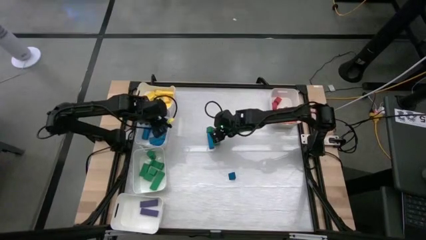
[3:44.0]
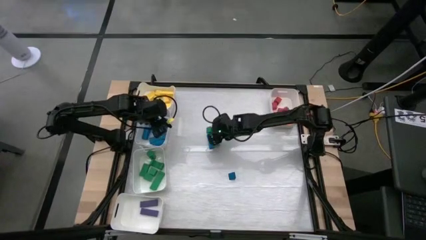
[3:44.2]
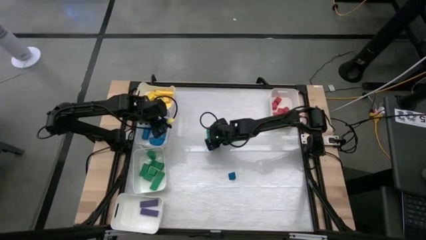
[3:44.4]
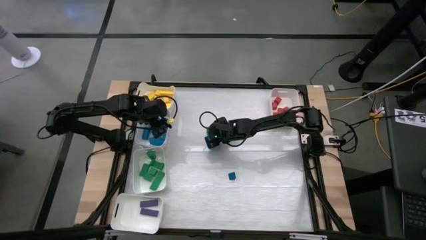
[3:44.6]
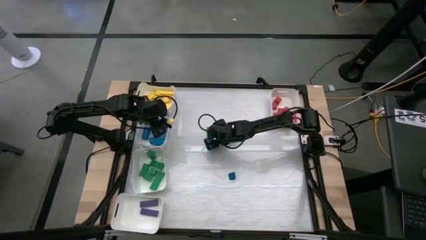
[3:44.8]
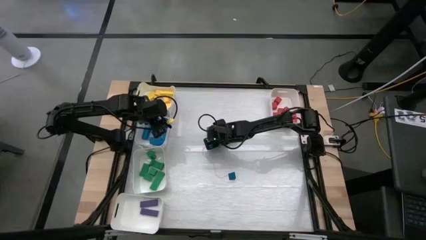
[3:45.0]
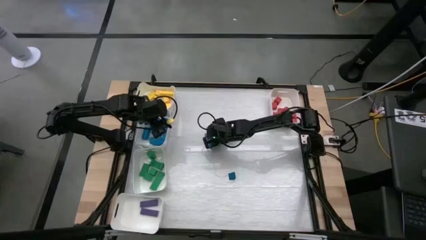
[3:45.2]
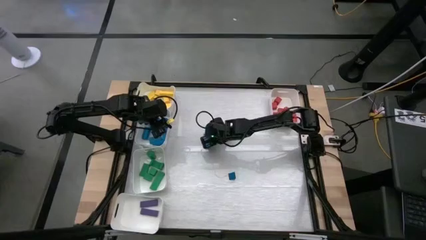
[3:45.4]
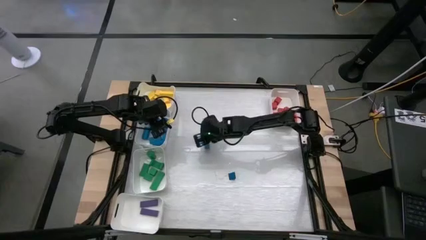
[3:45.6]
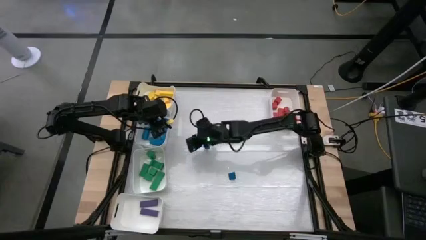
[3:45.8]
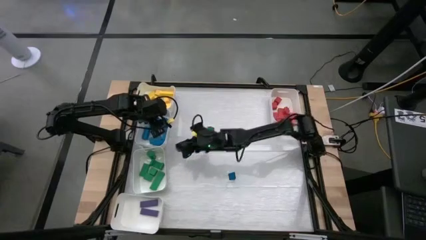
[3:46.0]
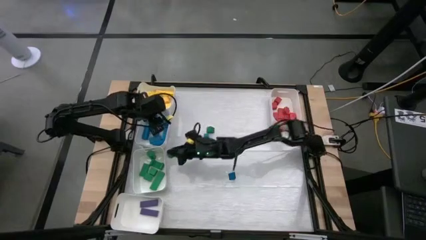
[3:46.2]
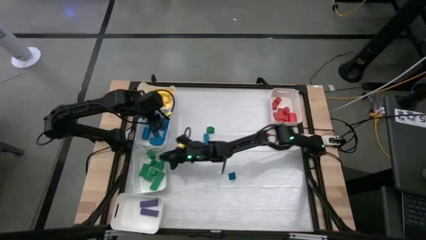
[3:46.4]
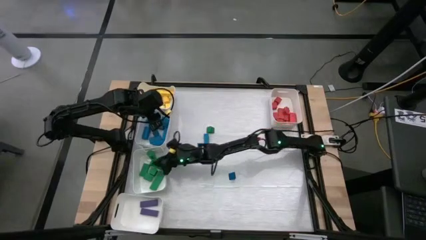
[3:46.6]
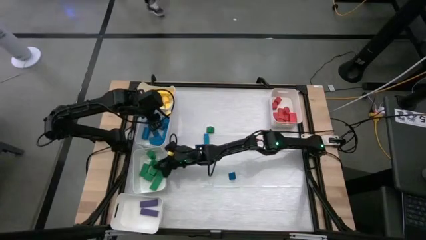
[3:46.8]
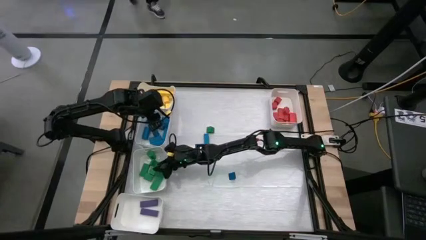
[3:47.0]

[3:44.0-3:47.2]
Task: Sort blocks
Put the green wooden block into the bottom middle left white bin

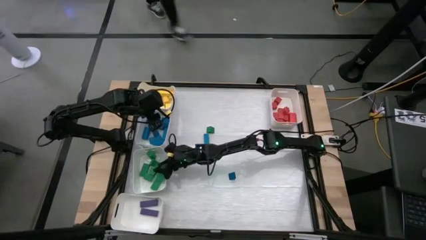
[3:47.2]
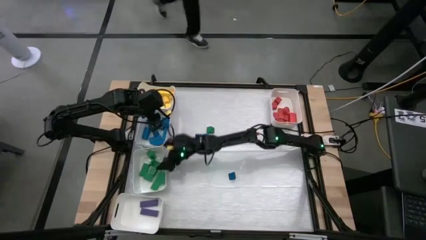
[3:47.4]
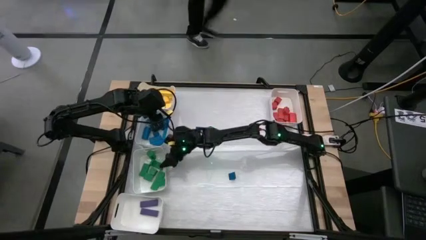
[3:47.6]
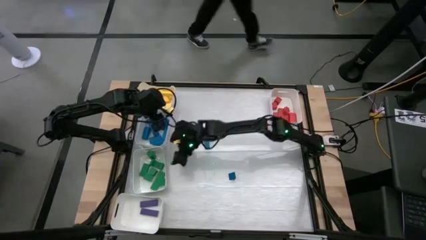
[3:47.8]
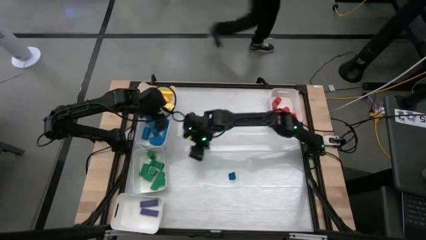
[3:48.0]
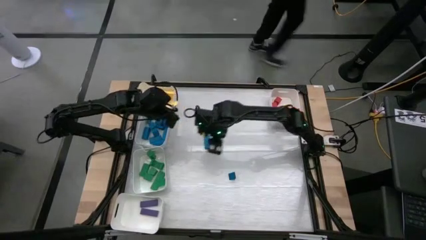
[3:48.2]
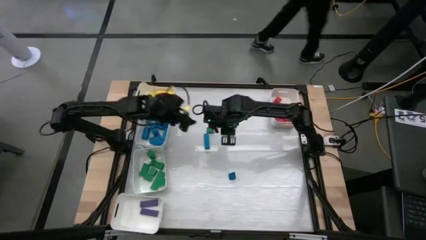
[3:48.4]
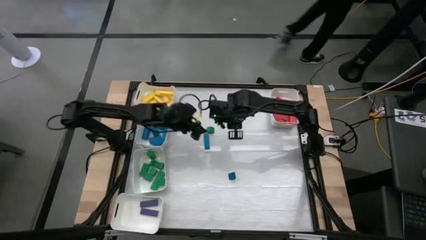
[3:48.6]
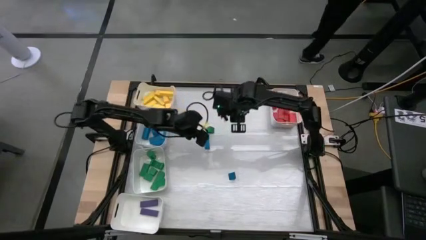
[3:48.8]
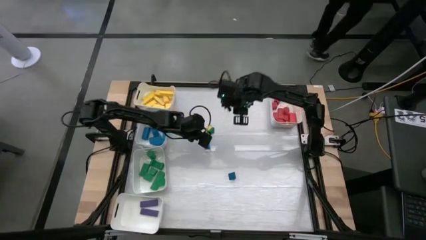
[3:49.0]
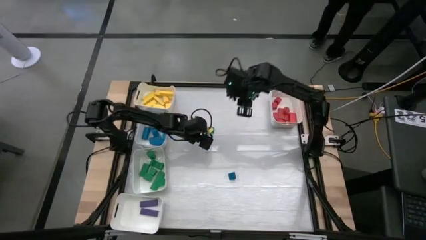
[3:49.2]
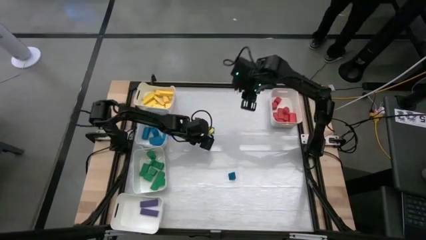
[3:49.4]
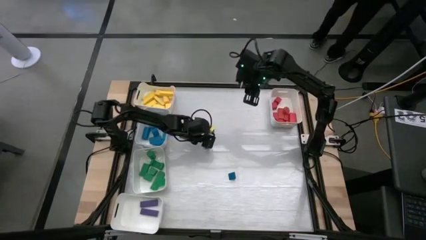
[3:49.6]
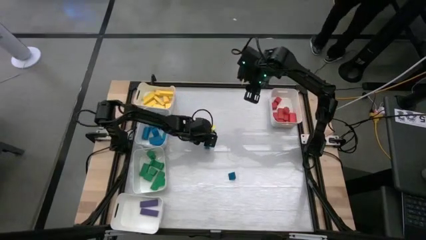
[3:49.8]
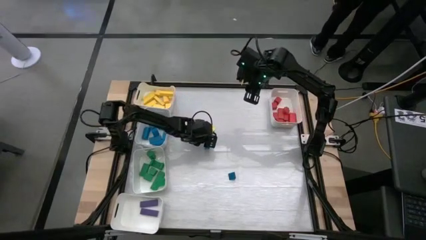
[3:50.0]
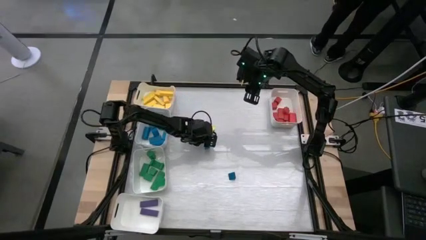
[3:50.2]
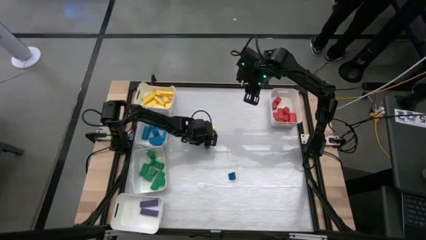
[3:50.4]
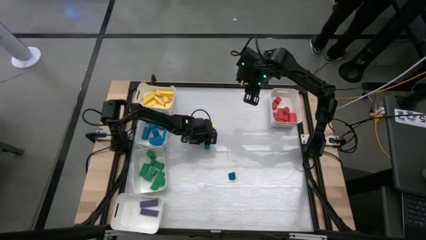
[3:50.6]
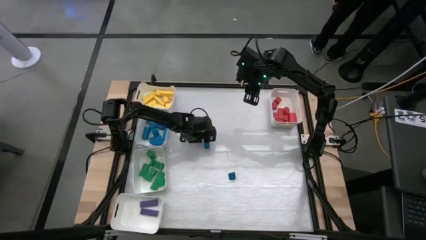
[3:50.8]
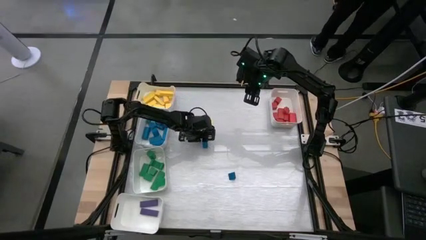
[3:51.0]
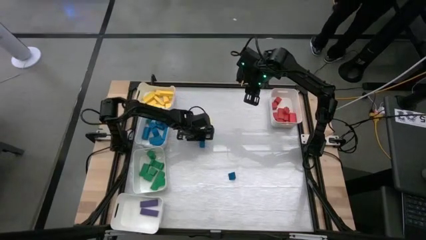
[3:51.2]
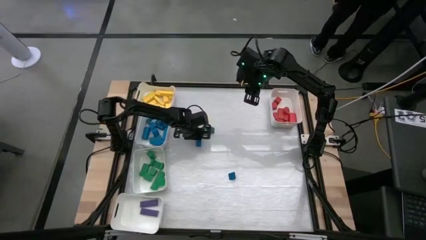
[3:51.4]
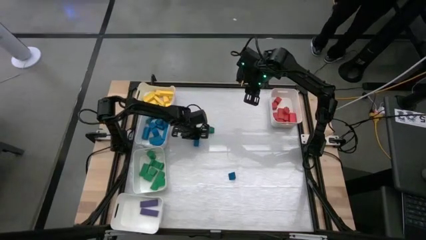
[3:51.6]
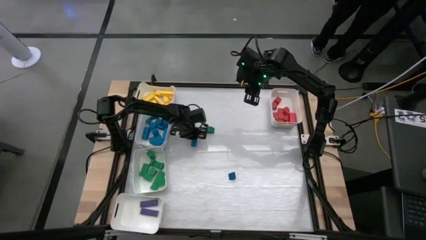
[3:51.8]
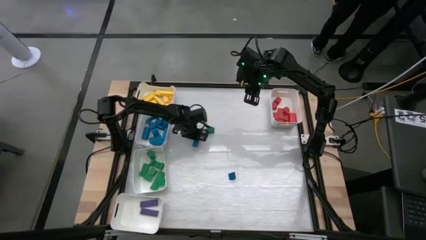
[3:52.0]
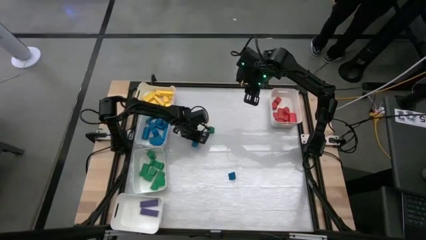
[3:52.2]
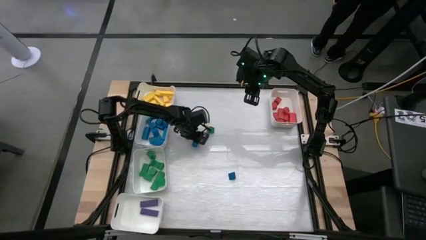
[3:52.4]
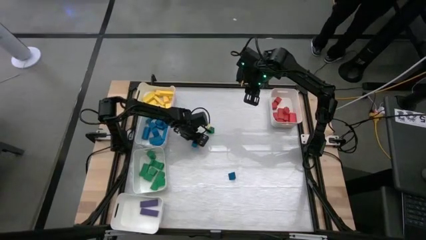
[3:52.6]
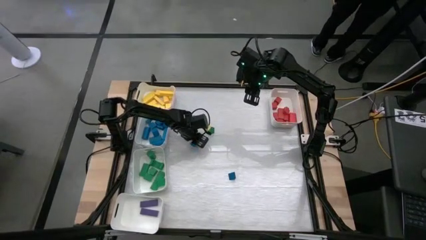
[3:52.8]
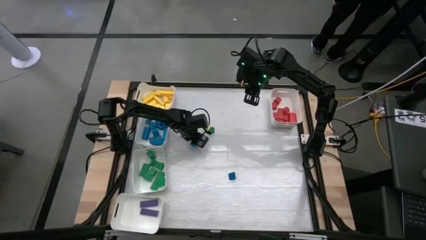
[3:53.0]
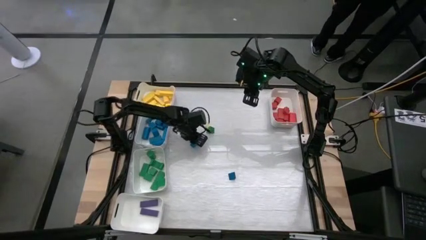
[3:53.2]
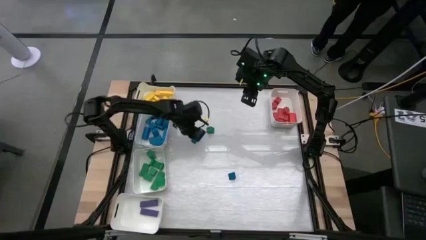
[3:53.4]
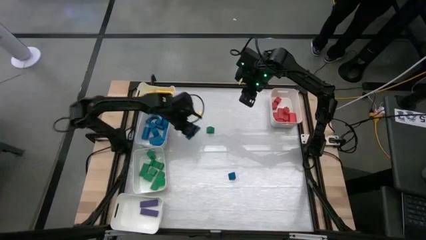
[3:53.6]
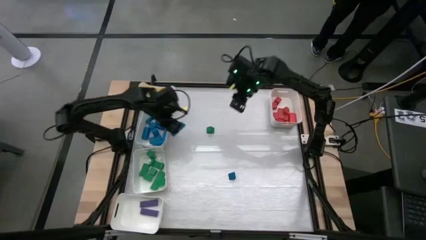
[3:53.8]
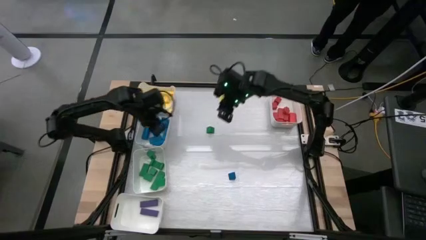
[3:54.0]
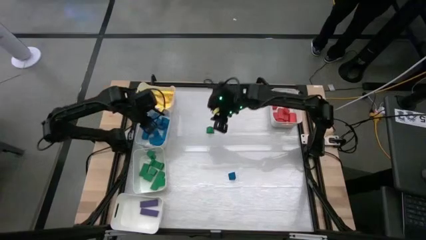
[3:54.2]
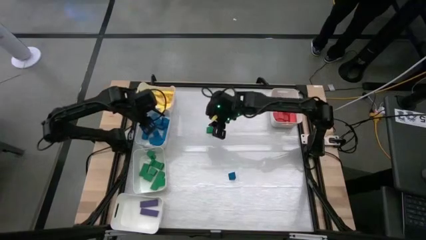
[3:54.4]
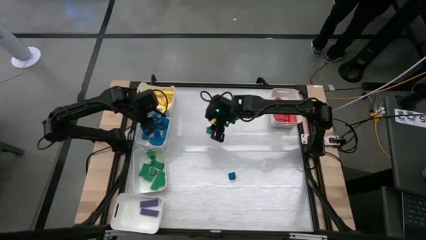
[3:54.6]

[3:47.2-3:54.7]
Put the blue wooden block into the top middle left white bin

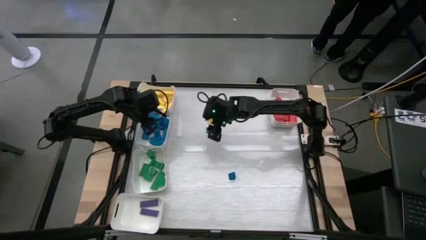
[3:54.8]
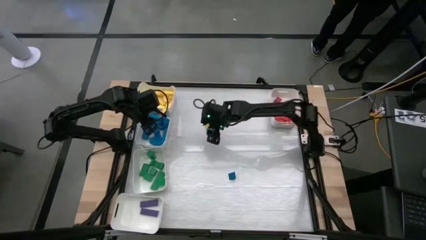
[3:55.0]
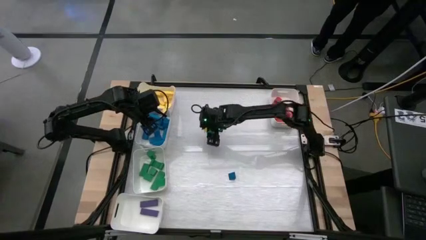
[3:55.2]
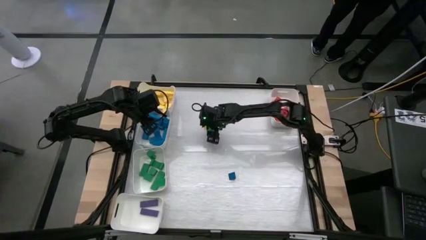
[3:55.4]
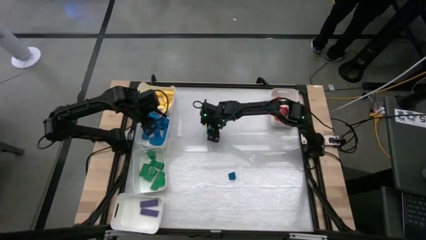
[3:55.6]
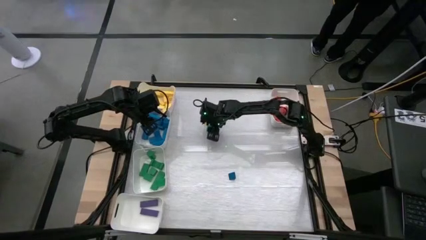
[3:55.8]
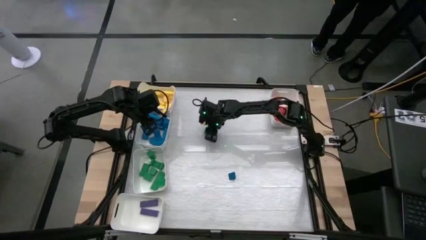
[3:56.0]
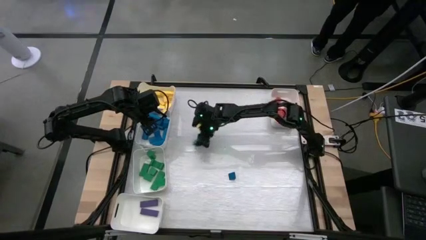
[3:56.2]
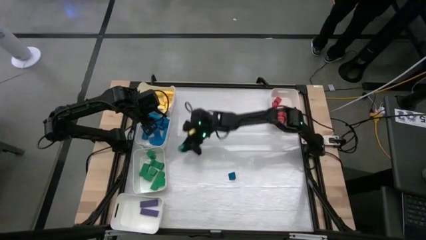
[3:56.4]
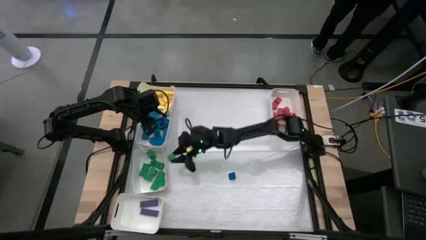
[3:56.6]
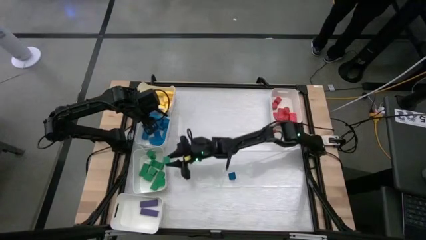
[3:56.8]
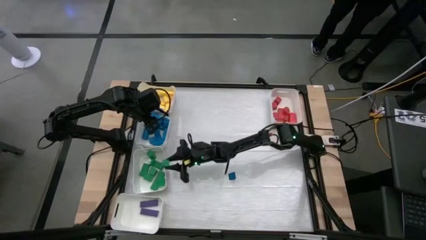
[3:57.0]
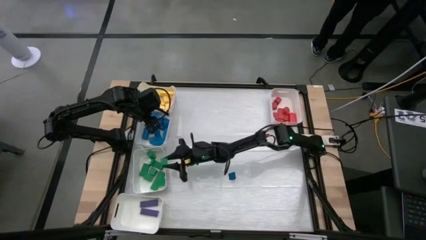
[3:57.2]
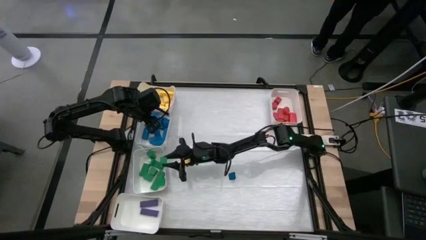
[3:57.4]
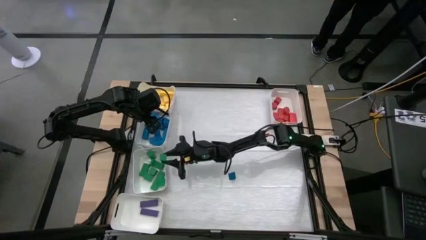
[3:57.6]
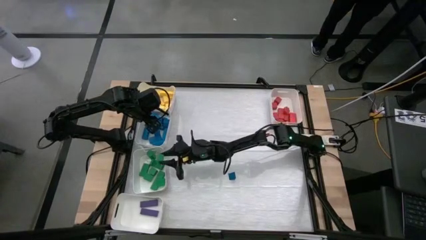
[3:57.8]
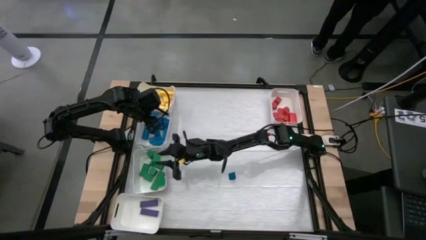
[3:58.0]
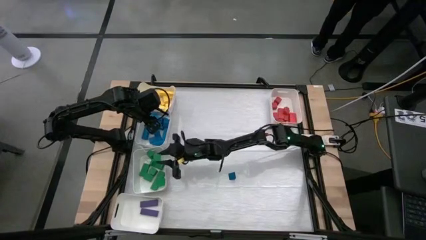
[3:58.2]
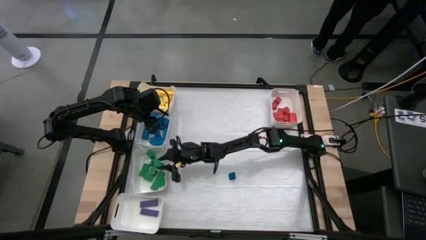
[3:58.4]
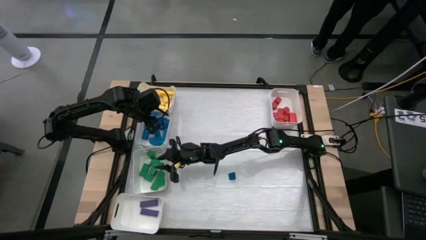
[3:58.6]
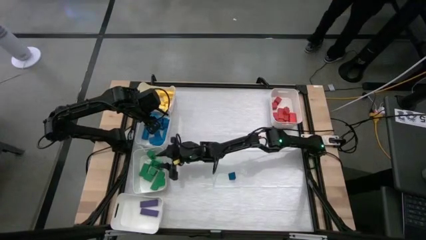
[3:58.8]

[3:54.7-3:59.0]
Put the green wooden block into the bottom middle left white bin

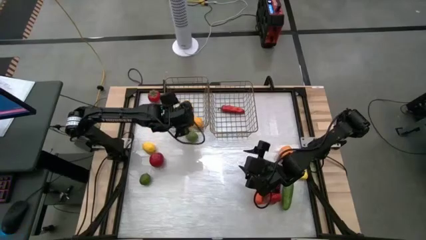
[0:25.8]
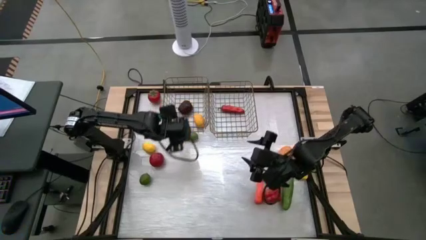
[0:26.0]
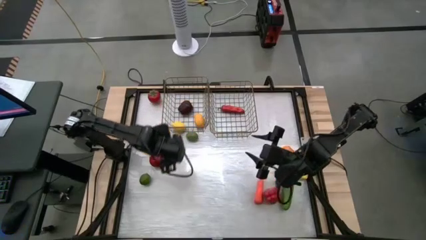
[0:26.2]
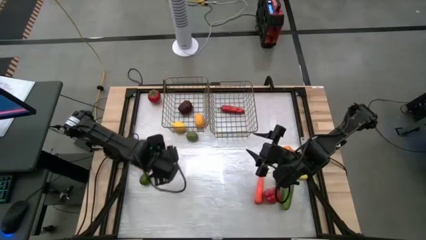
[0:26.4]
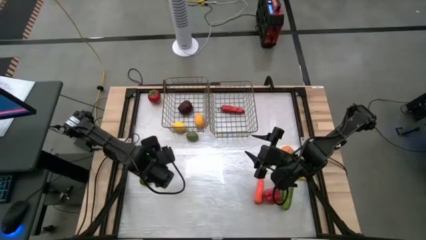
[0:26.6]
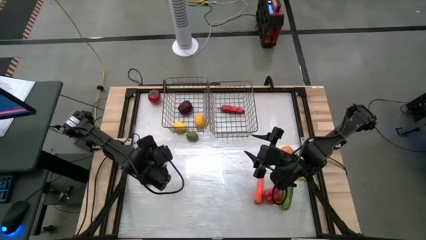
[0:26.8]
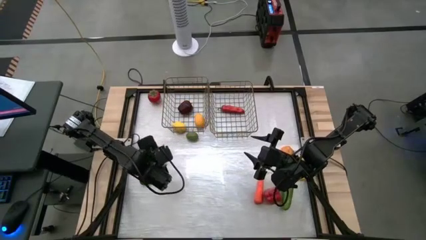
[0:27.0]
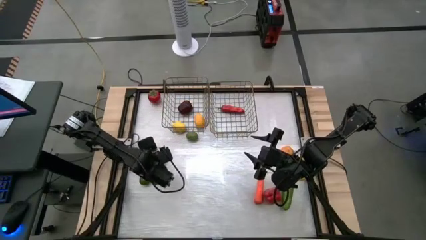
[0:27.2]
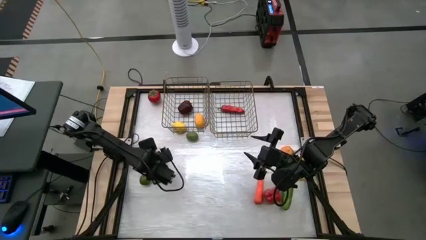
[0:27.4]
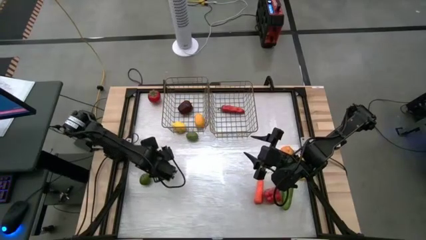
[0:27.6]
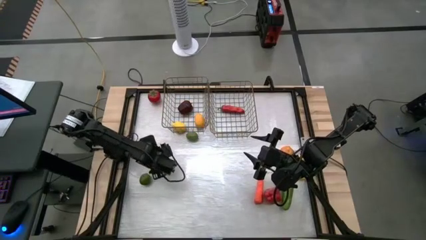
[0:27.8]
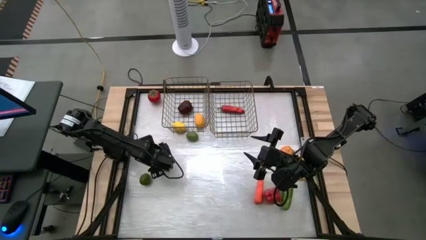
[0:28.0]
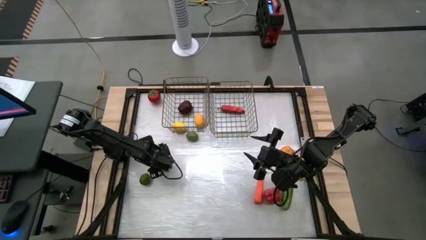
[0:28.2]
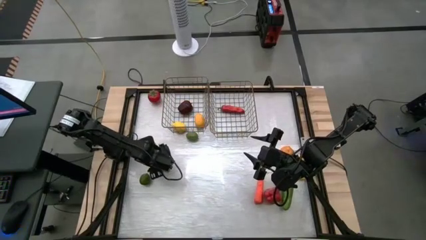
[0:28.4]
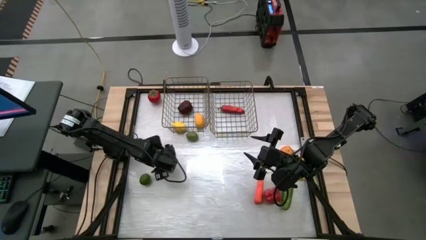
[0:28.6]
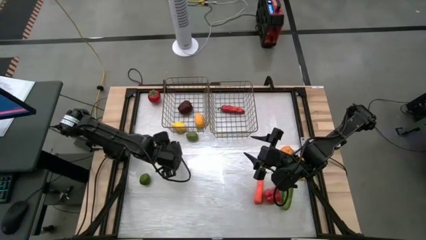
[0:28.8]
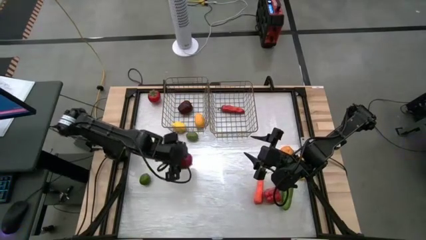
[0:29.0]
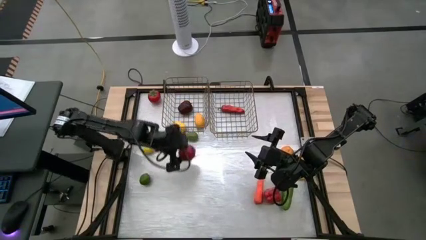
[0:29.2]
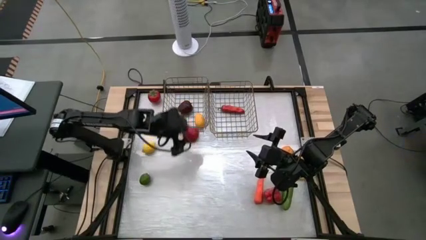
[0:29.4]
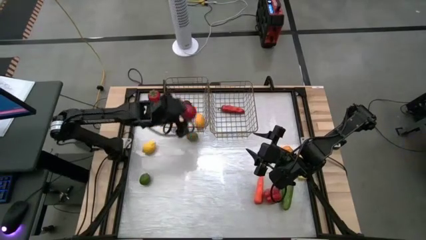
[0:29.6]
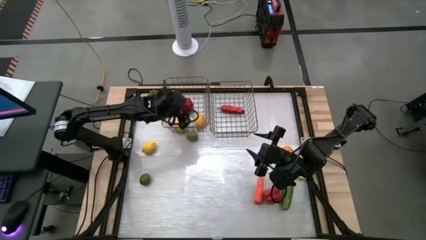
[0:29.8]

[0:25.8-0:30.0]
Task: Sort produce into baskets
Put the bottom tomato into the left wire basket
